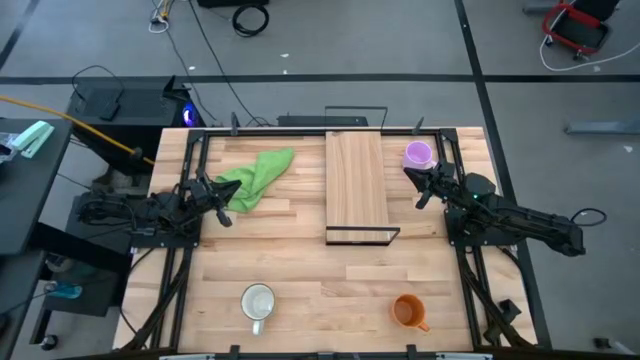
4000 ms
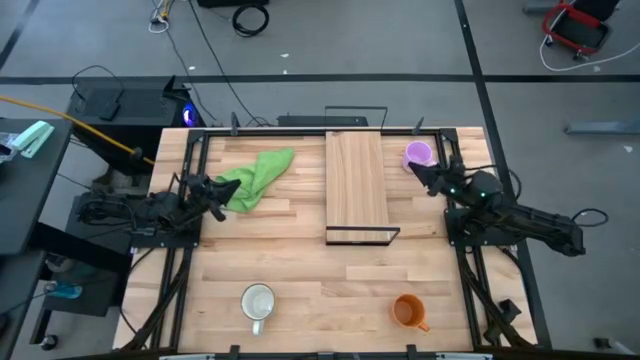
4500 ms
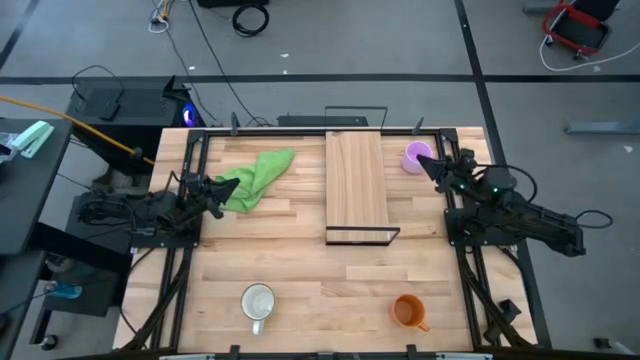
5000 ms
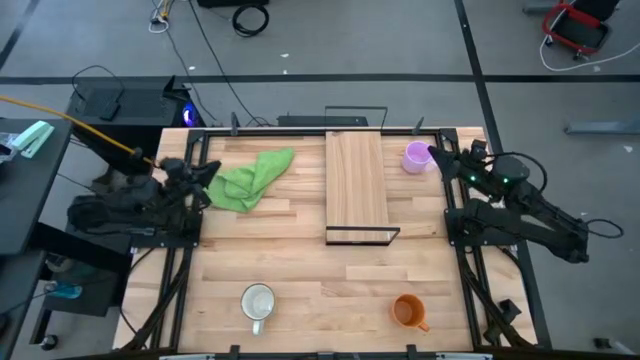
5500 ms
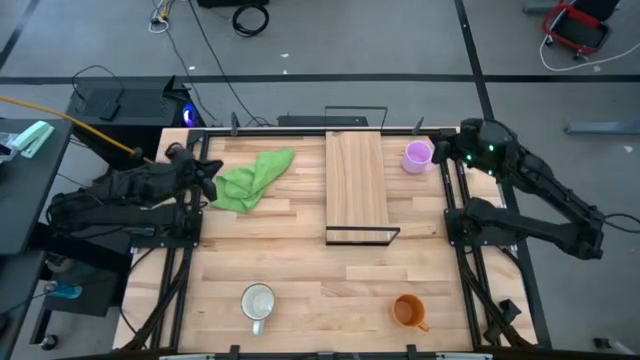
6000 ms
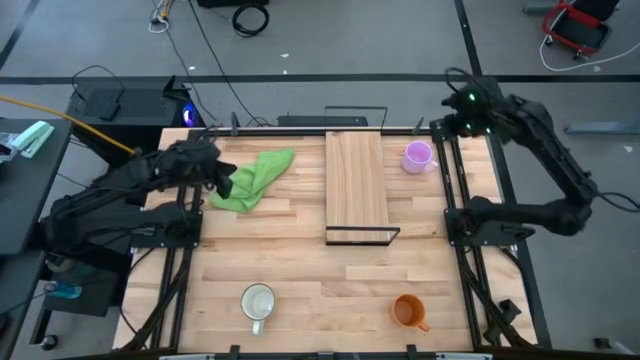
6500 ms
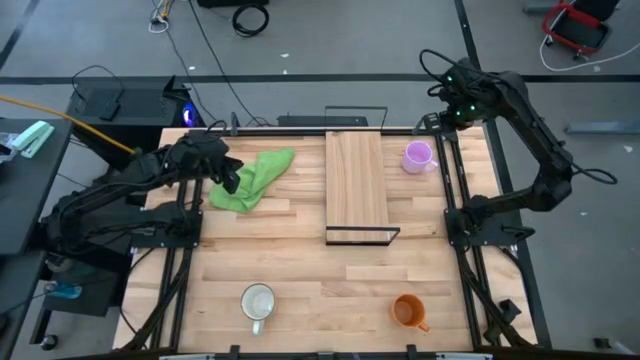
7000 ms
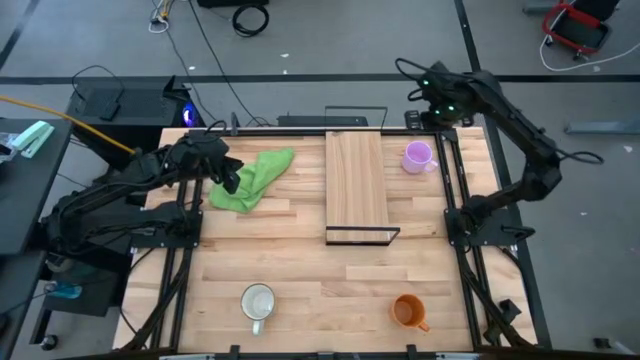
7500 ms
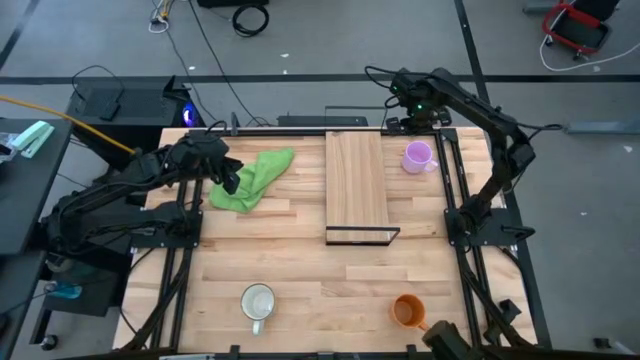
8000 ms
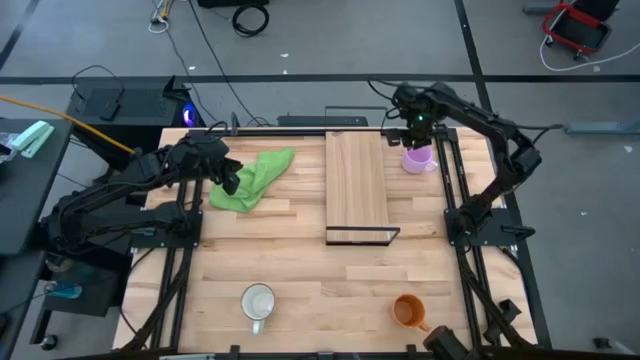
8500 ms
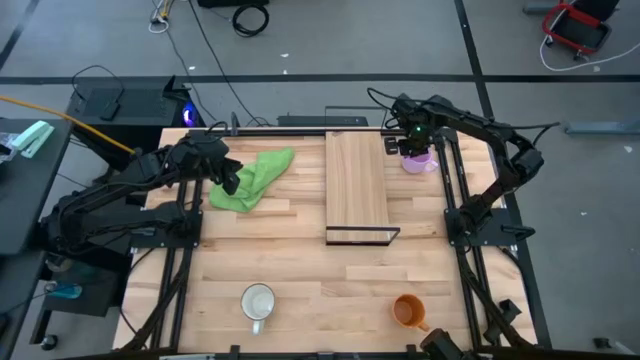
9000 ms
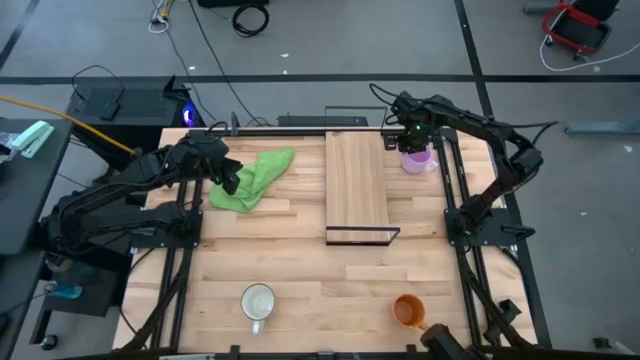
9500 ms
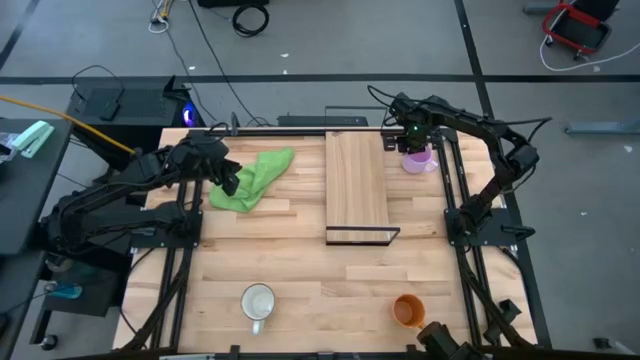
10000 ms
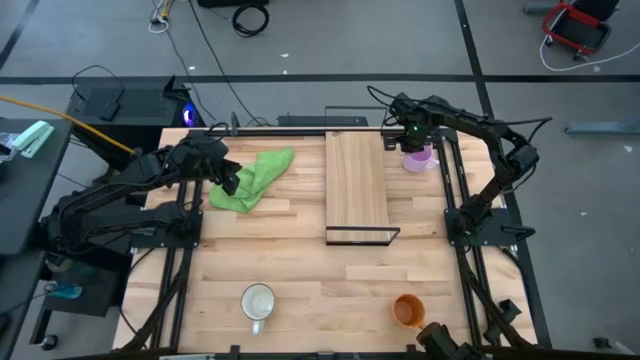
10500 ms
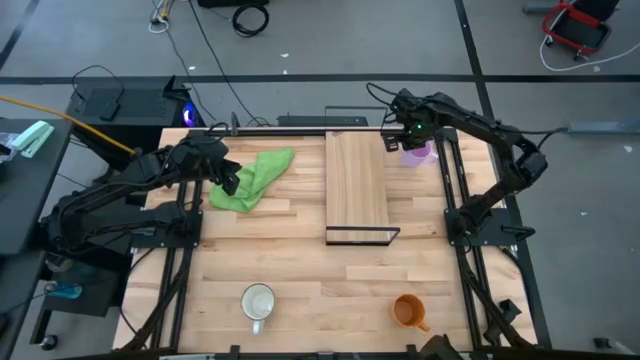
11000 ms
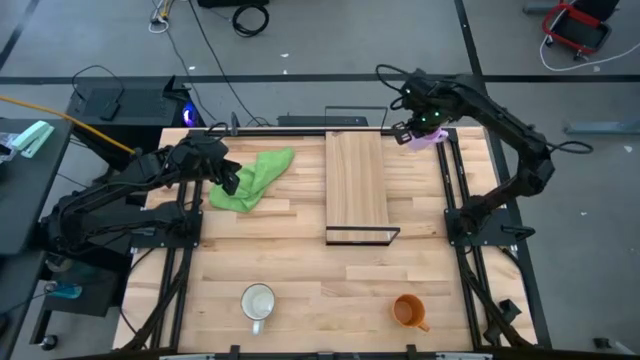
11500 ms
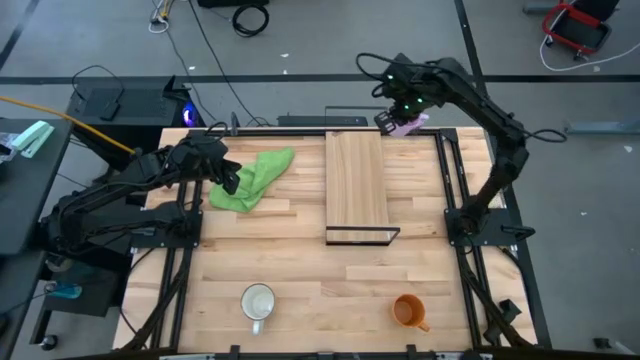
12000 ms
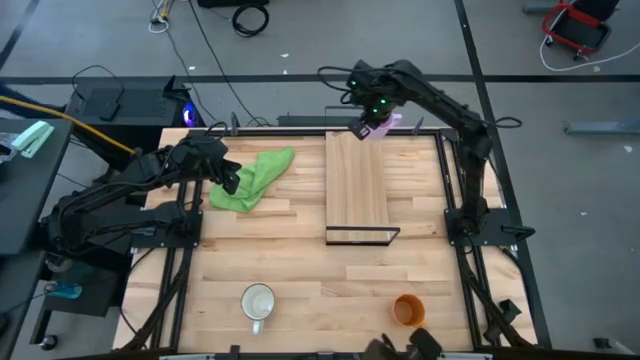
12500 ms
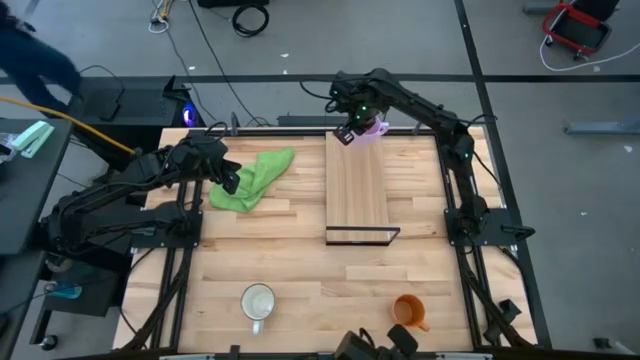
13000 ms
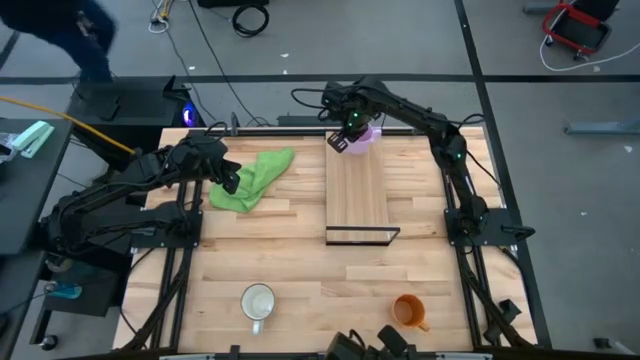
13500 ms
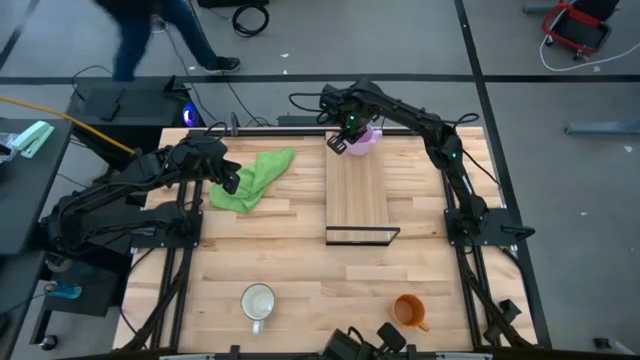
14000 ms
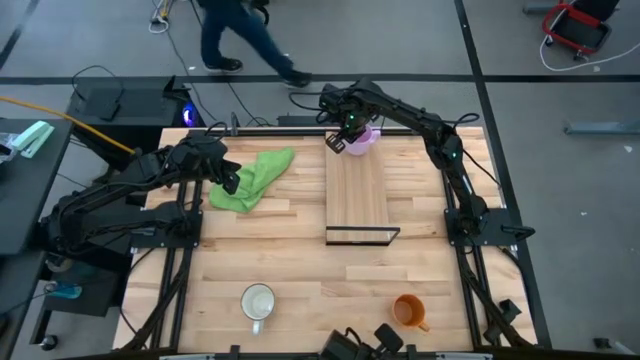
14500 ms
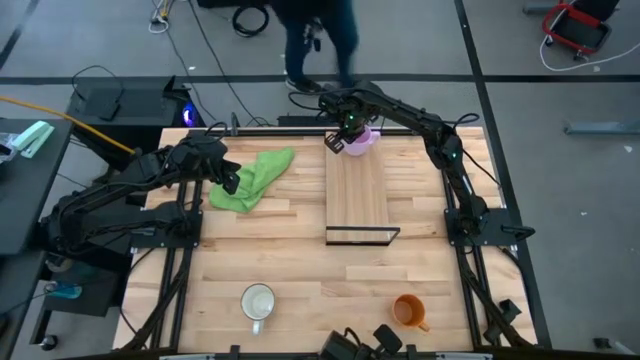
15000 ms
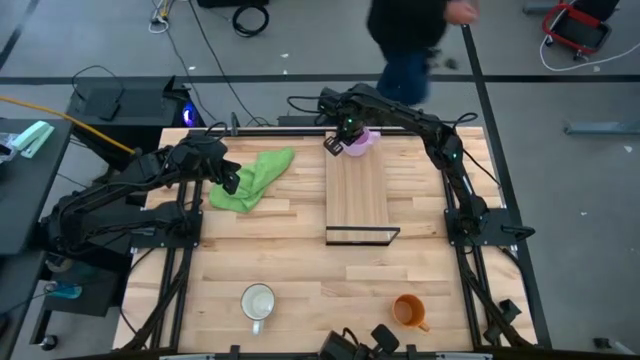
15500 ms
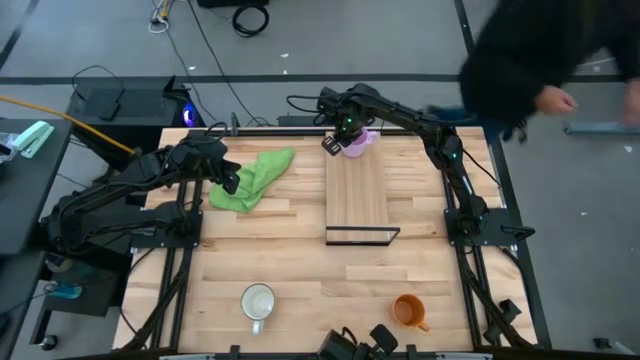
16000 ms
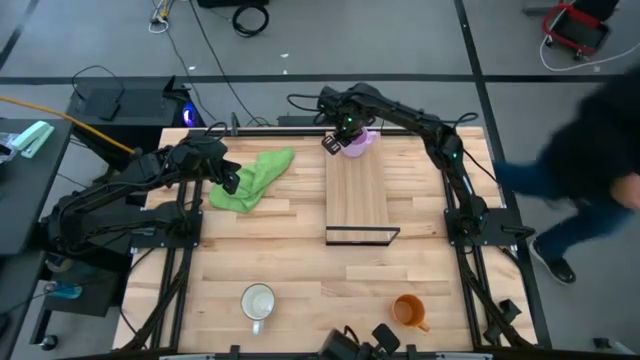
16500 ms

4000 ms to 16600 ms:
Task: Stack small to large cups/mugs on shelf
Put the pink mug on the shelf

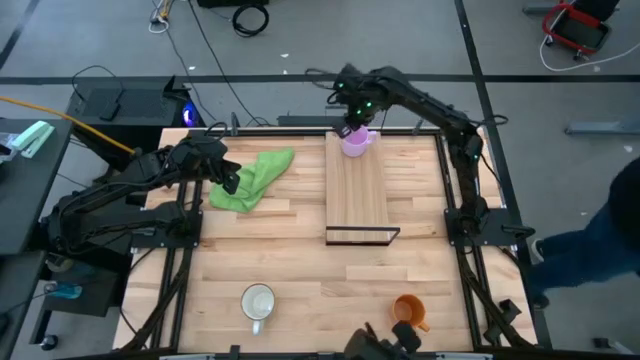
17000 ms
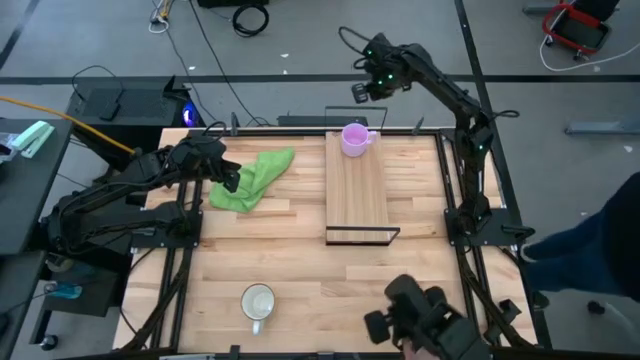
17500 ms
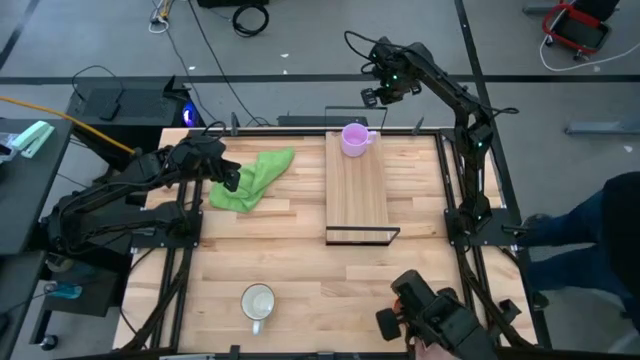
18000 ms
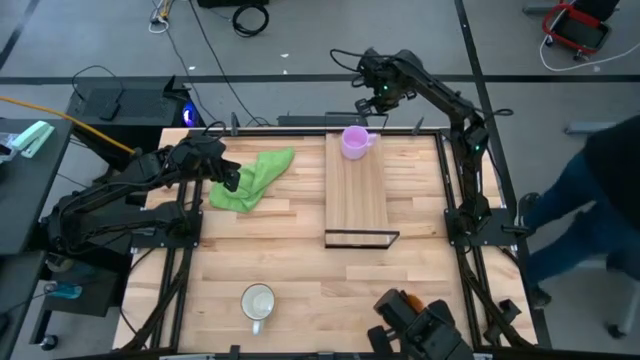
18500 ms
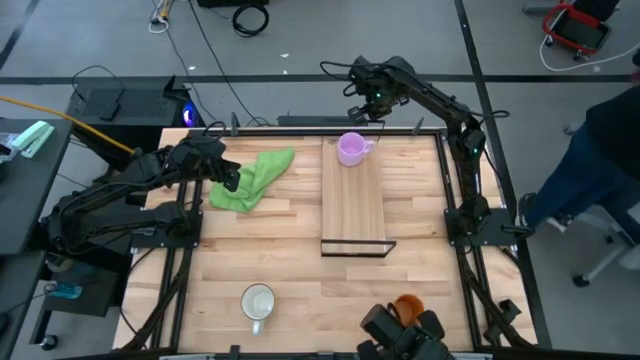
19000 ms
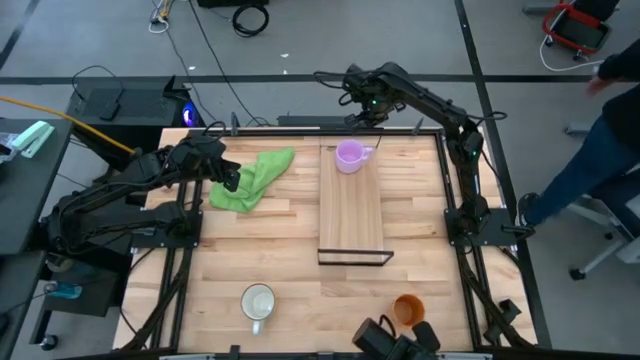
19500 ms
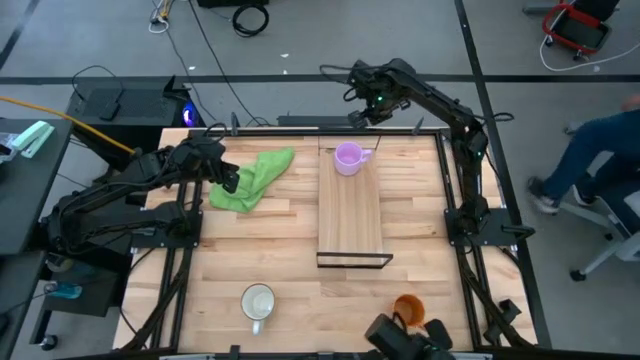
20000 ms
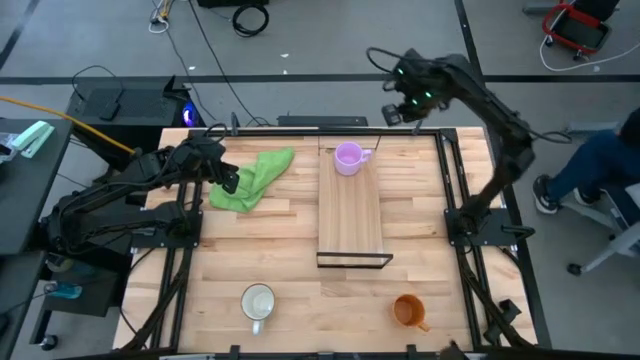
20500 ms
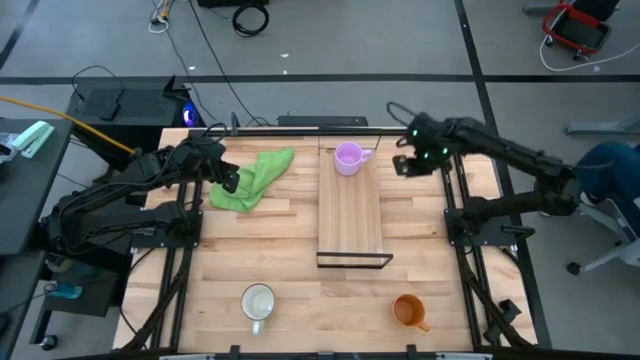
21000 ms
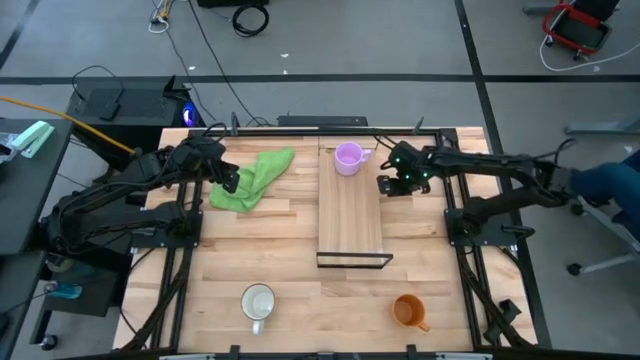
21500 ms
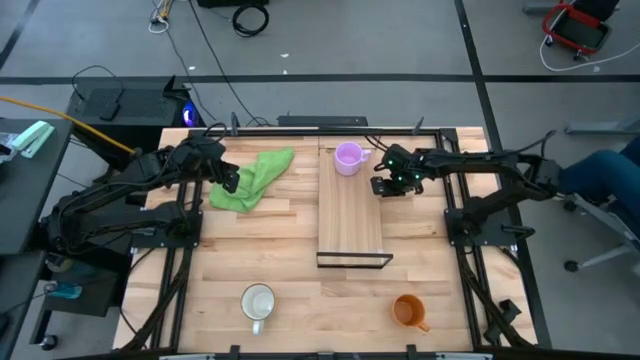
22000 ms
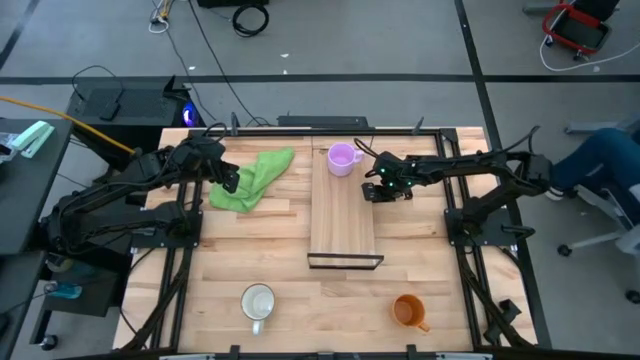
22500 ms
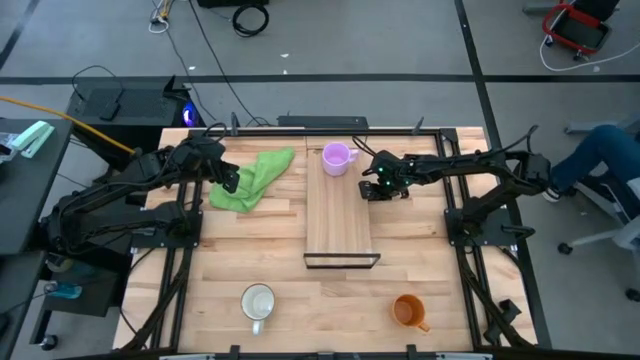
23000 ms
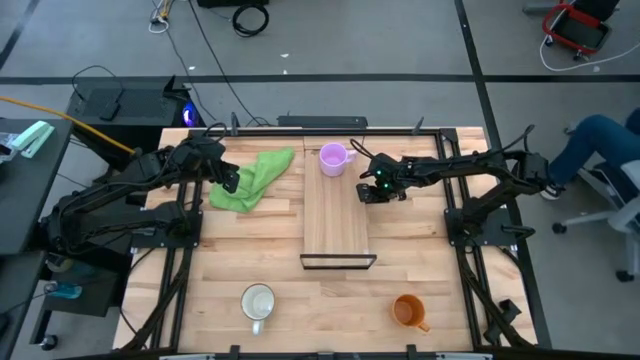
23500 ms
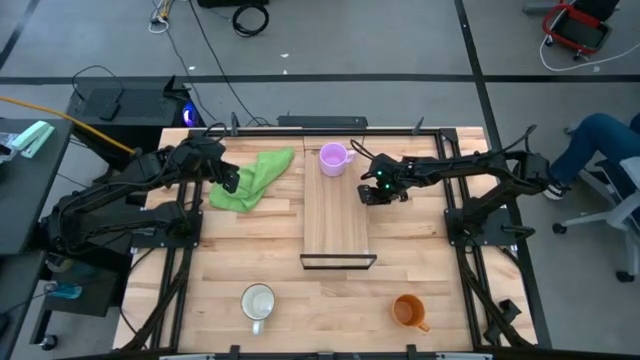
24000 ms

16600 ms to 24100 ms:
Move the shelf to the center of the table

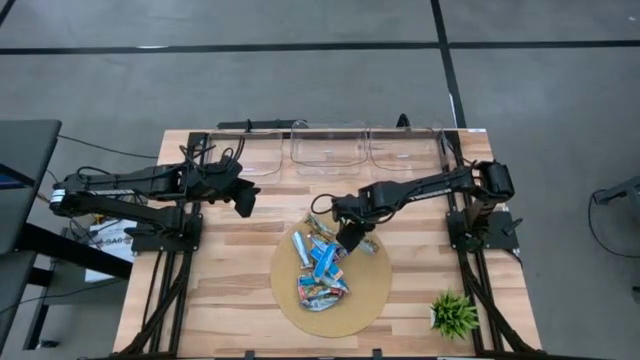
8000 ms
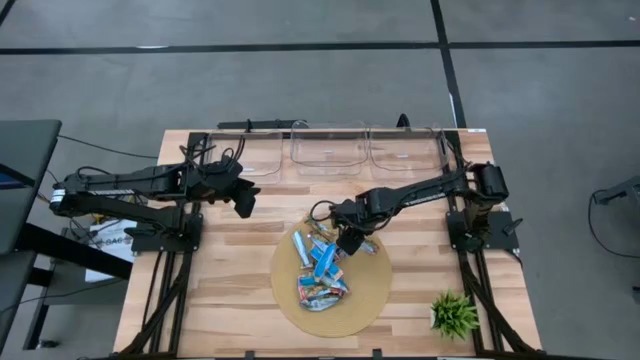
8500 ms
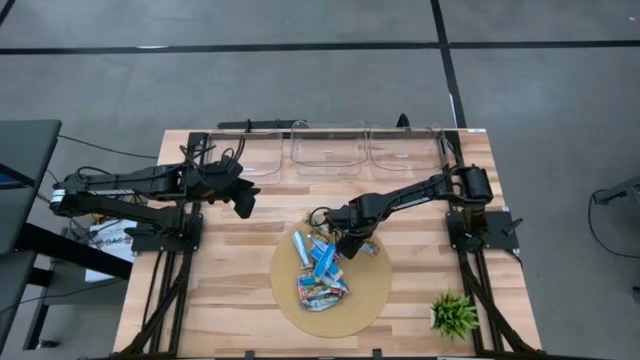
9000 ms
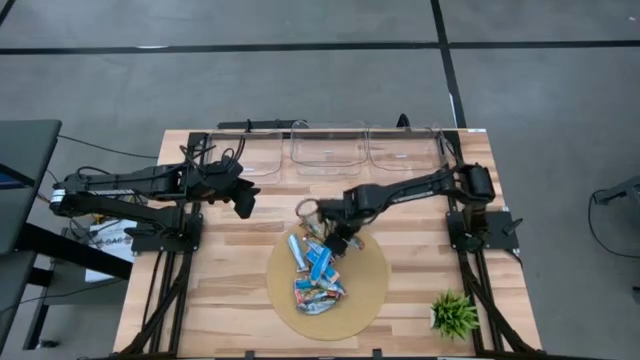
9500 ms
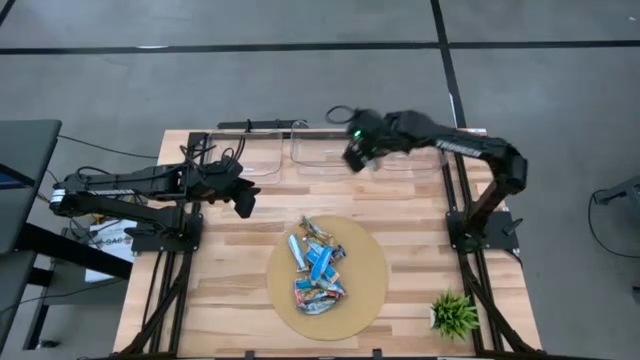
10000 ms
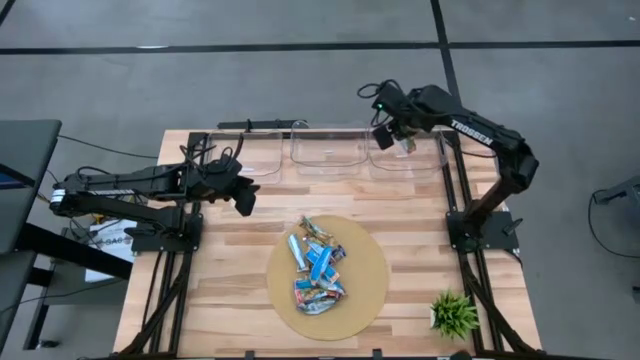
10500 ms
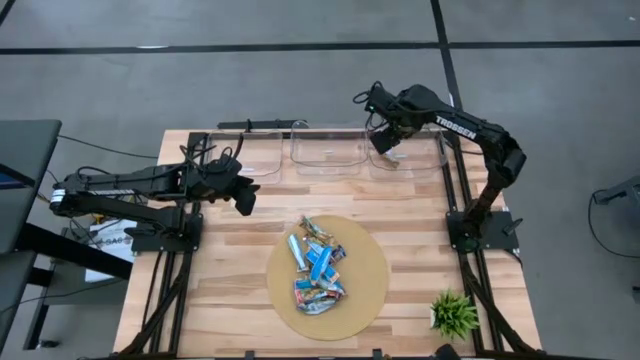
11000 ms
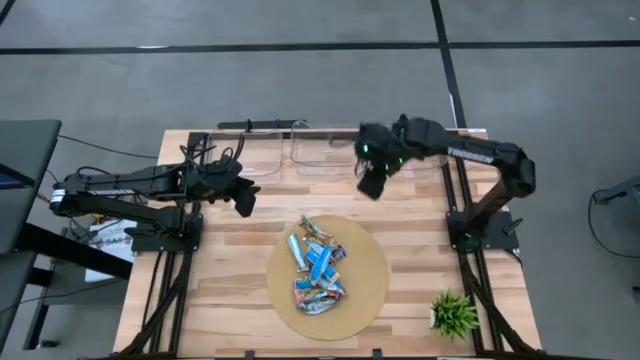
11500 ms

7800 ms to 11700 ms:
Task: Pick and place Granola Bars by type
Put the red granola bar into the right transparent bin
